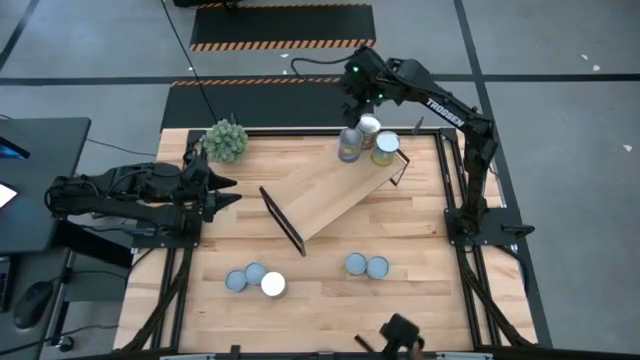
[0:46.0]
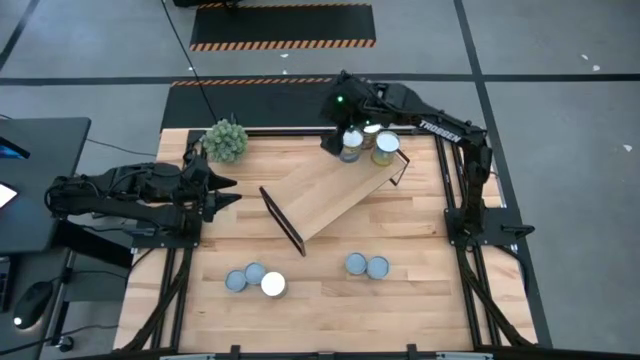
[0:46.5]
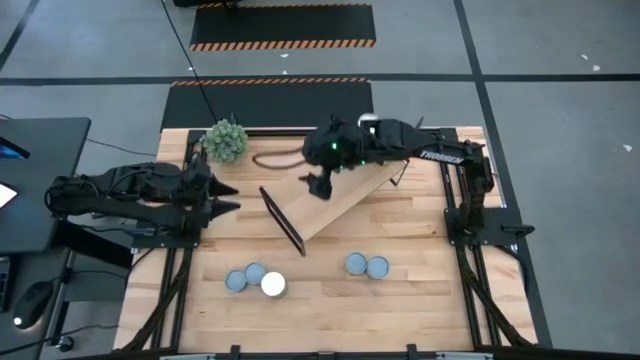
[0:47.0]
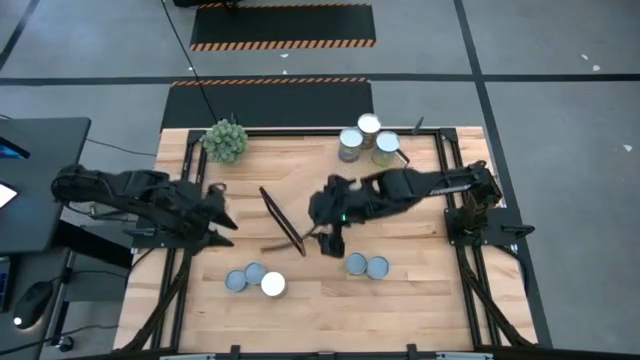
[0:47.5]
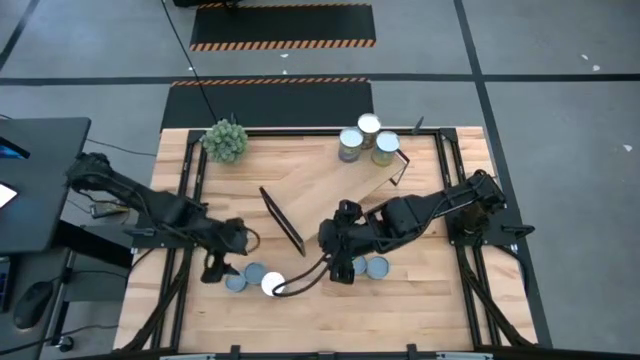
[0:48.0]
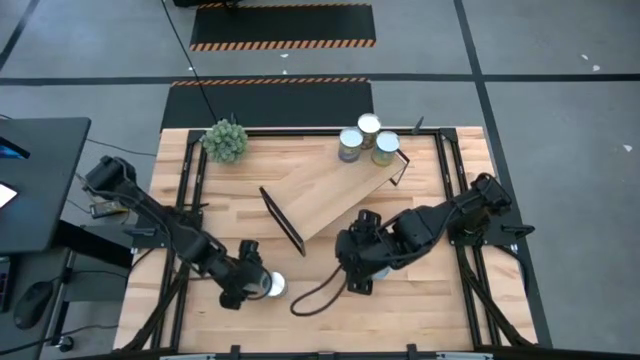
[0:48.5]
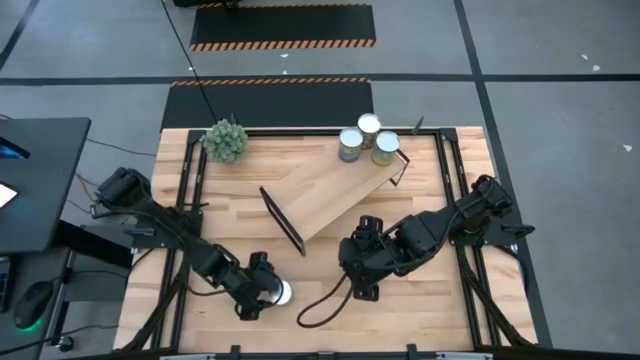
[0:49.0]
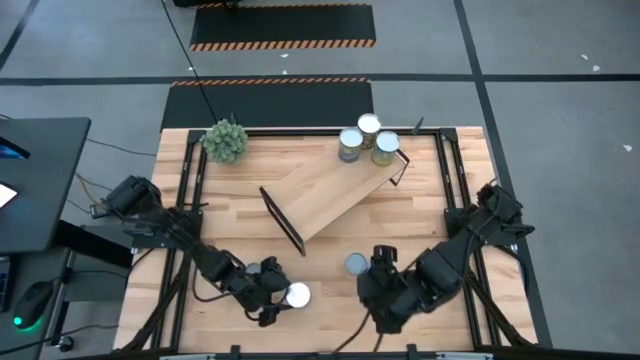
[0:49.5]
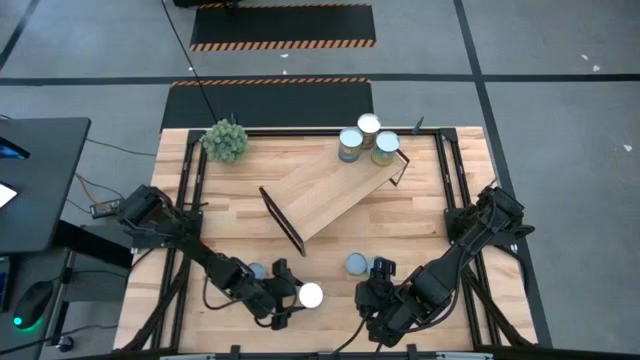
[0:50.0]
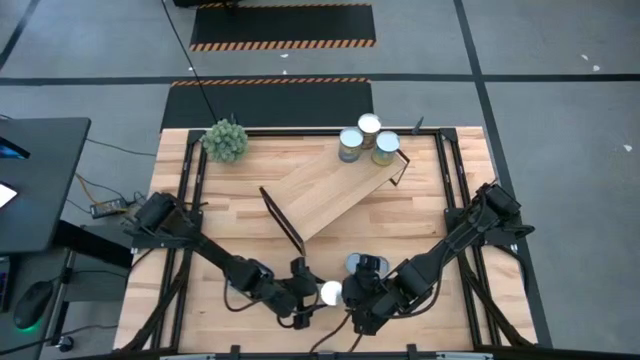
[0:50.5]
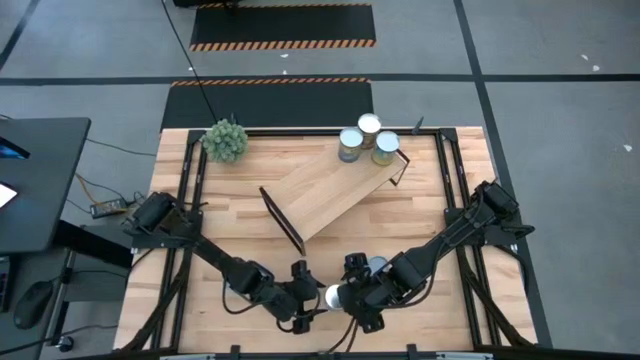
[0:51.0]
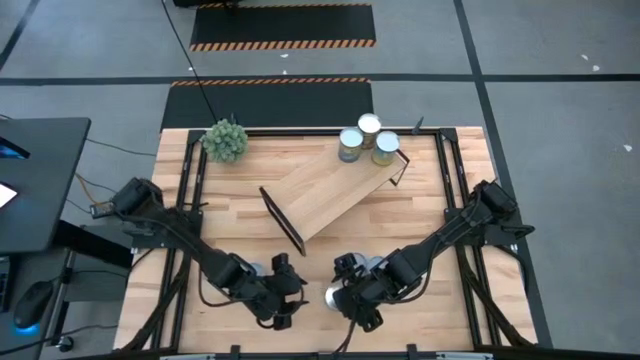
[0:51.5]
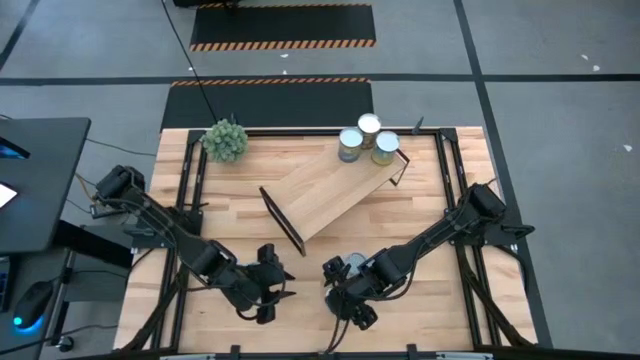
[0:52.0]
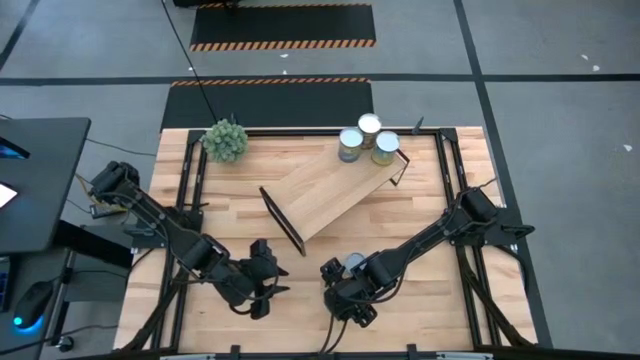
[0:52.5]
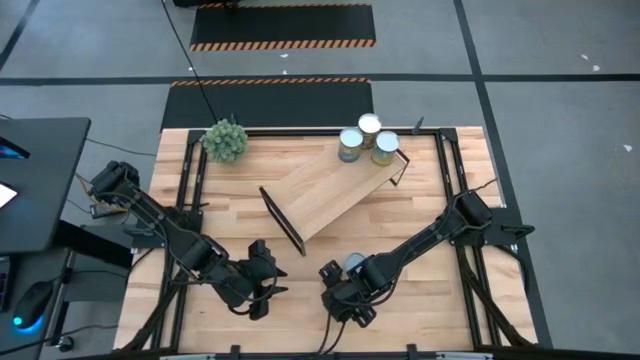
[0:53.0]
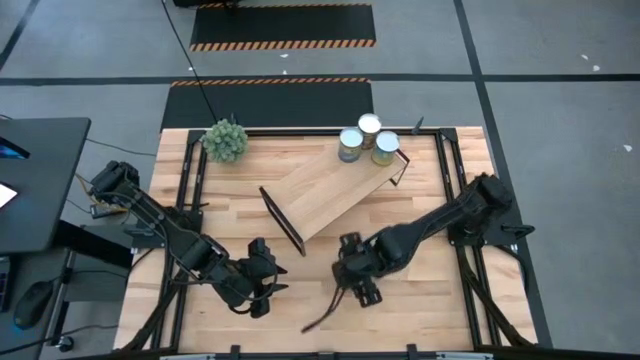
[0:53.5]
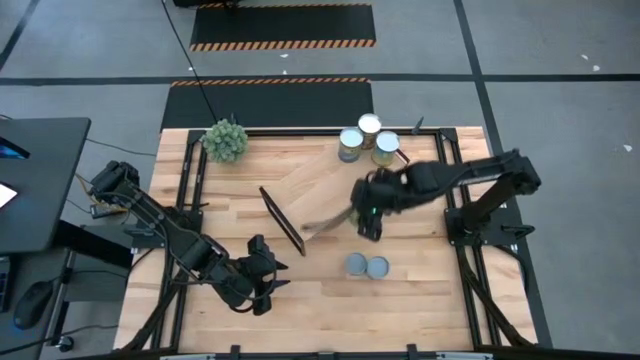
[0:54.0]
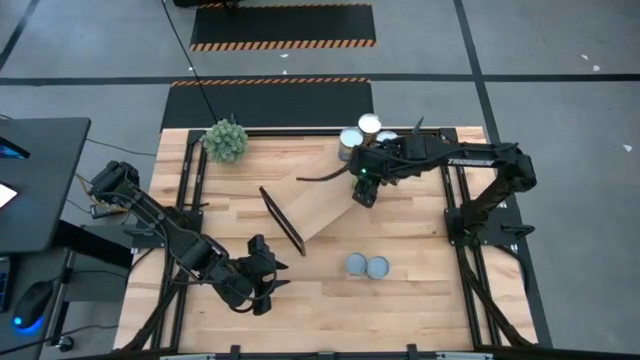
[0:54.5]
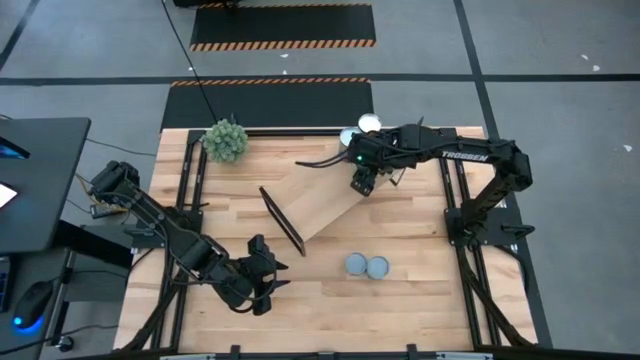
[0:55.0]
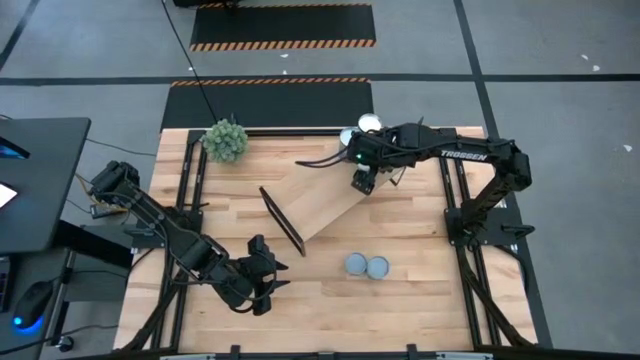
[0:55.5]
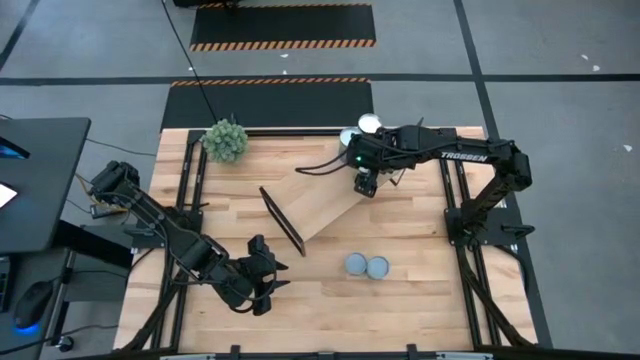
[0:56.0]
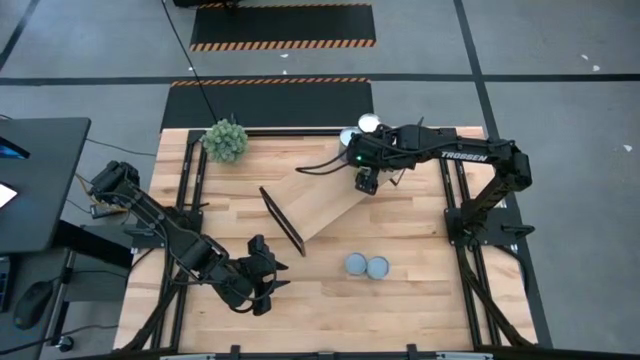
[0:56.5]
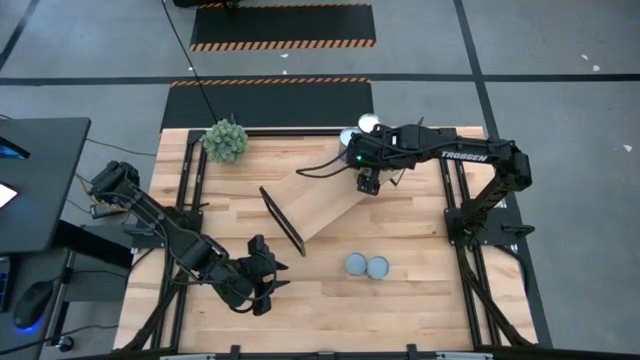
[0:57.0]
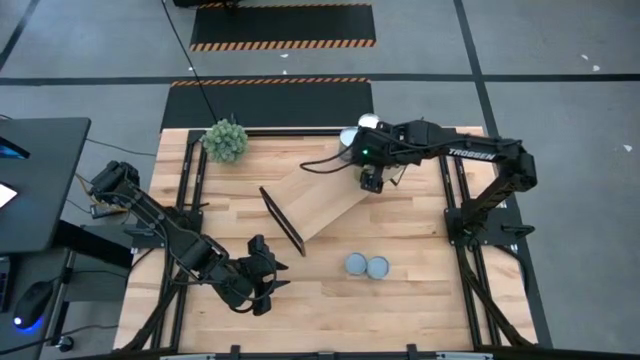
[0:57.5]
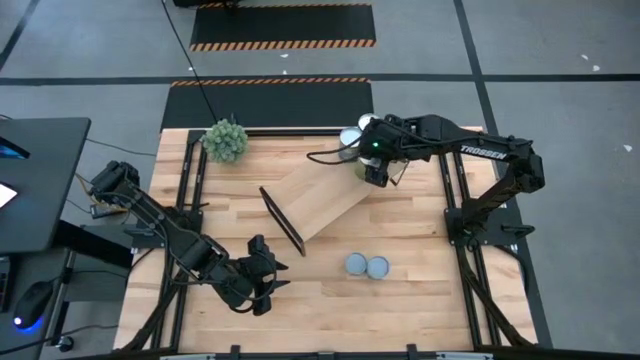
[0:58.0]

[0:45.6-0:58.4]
Task: Pick and place cans onto a shelf
Put the canned oranges on the shelf

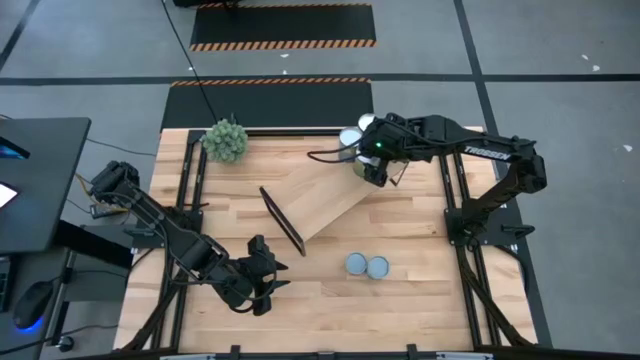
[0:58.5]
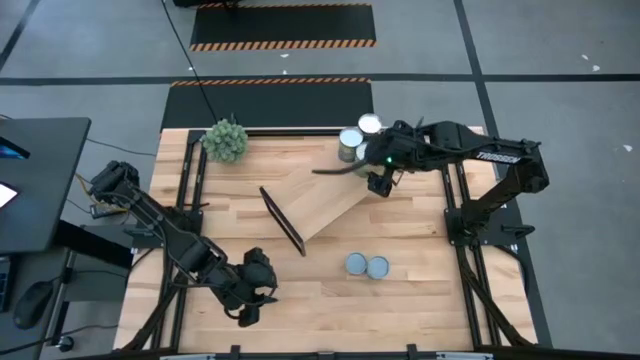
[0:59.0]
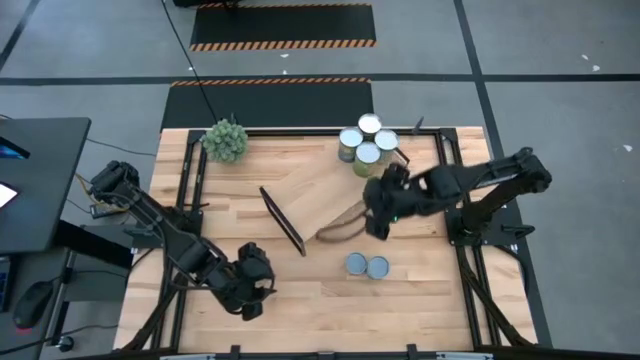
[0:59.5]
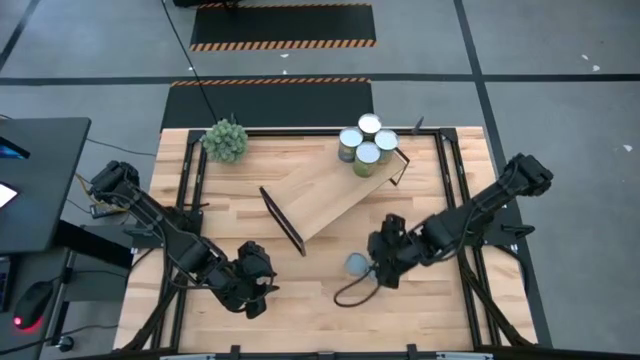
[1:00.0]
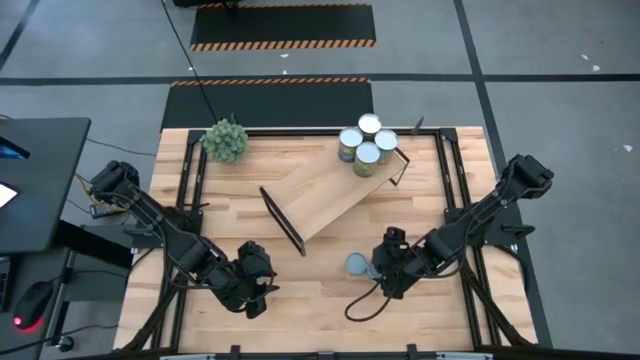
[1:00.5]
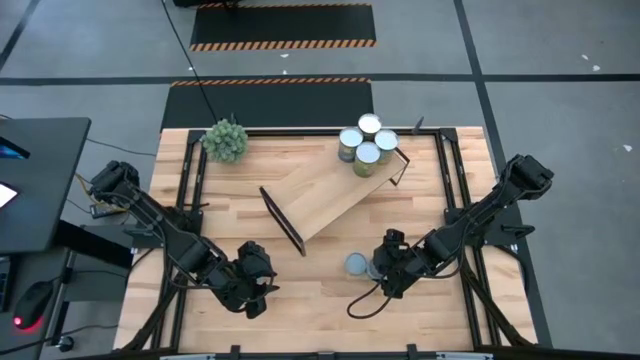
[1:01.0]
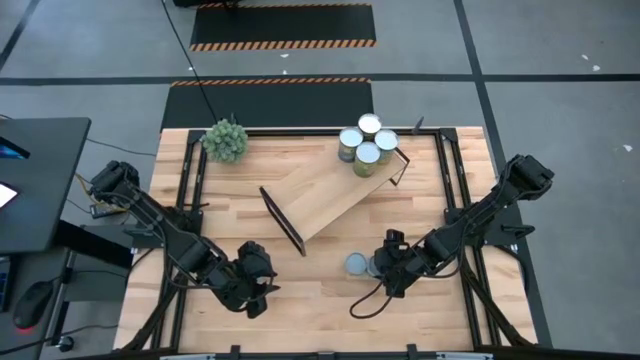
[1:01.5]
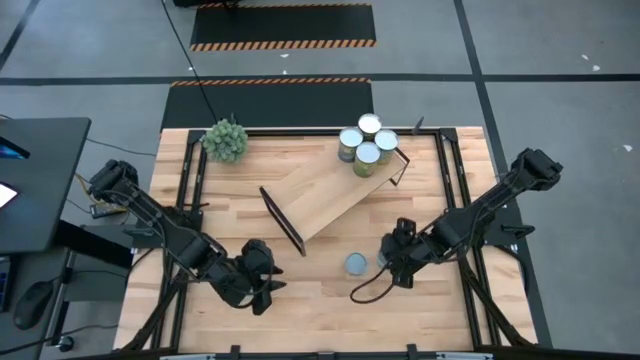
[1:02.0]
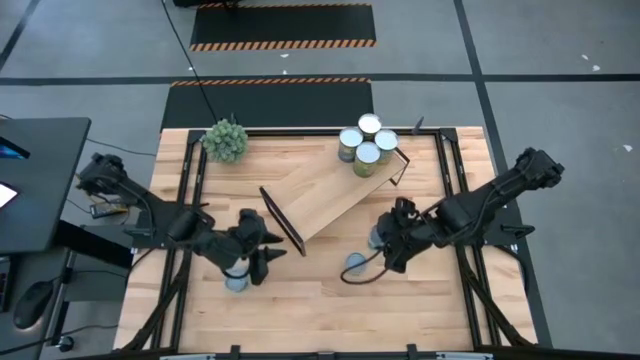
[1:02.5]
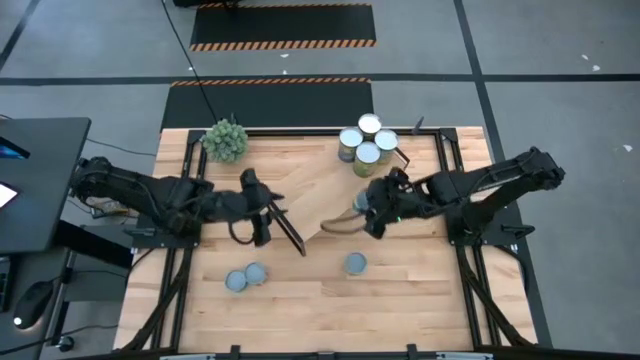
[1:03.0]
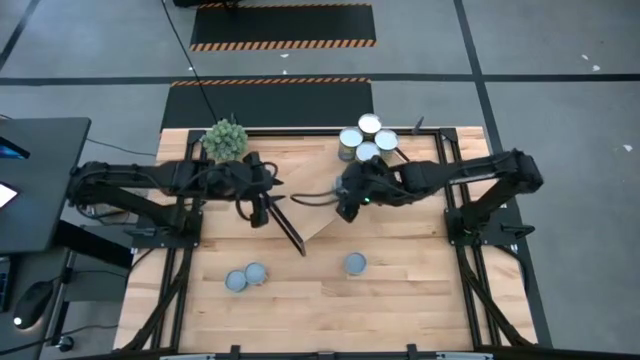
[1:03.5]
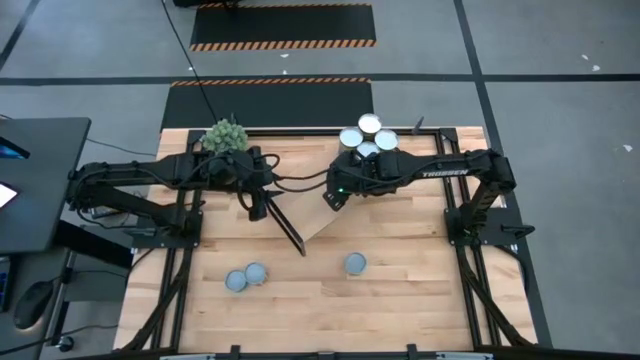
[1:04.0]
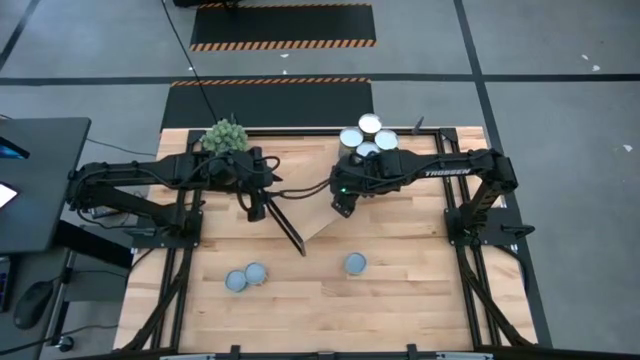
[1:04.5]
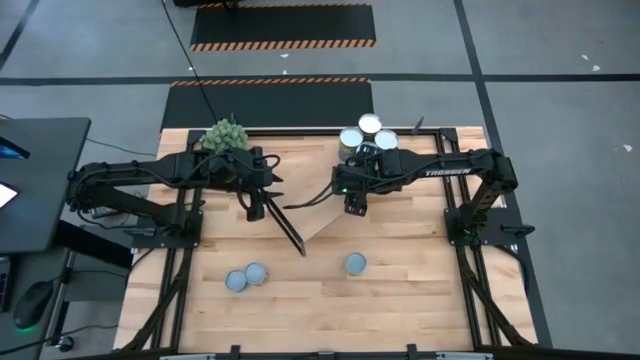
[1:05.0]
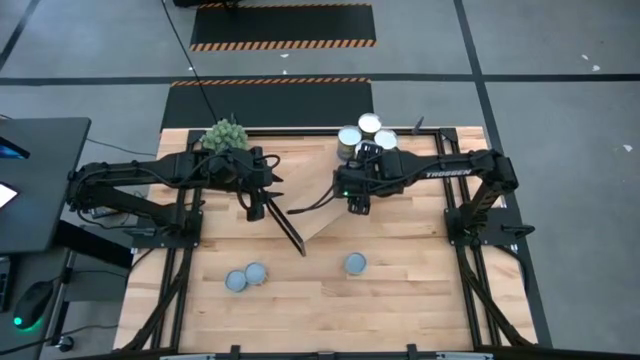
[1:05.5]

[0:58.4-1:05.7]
Put the canned mixed vegetables on the shelf
